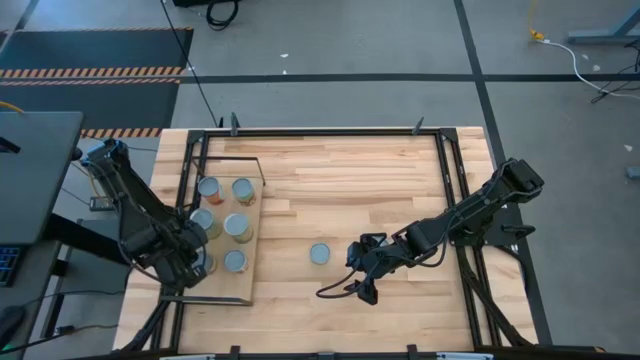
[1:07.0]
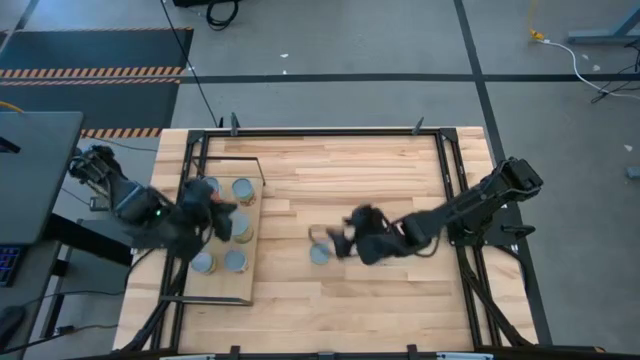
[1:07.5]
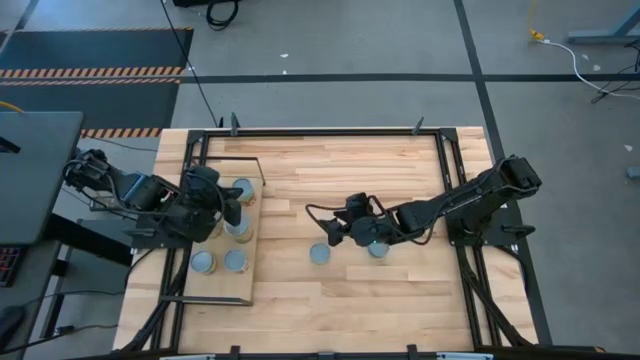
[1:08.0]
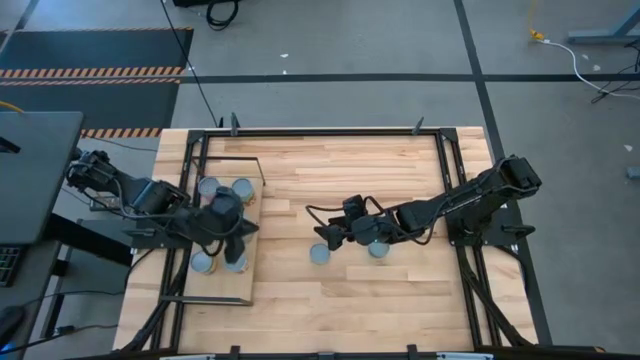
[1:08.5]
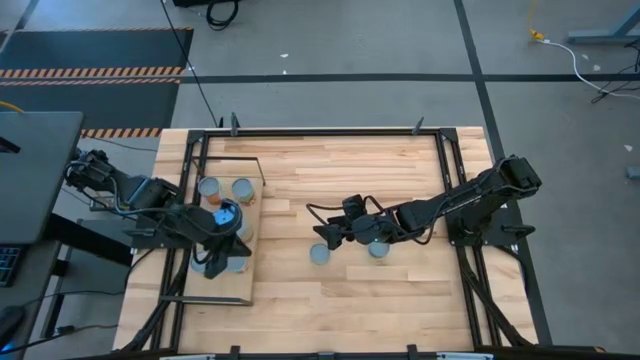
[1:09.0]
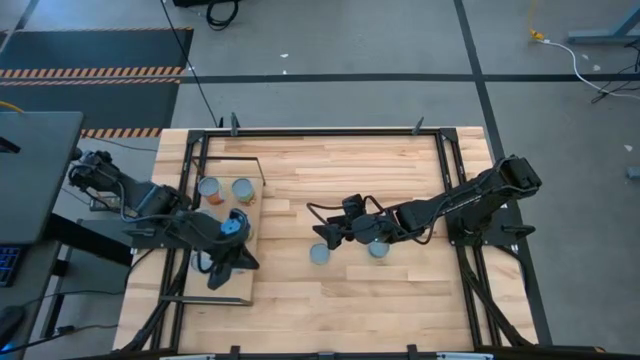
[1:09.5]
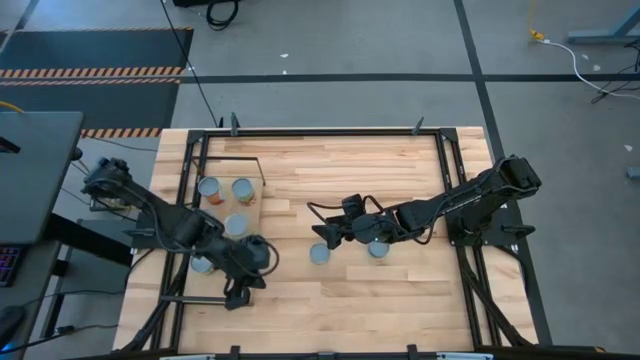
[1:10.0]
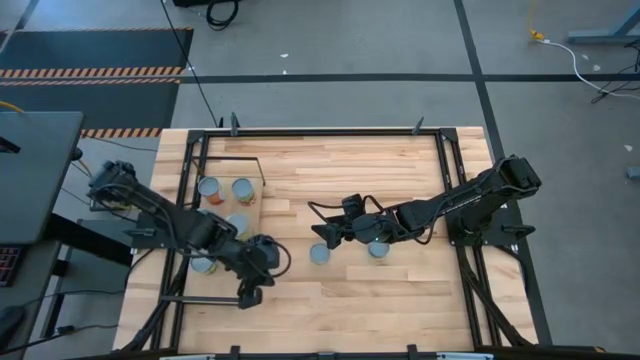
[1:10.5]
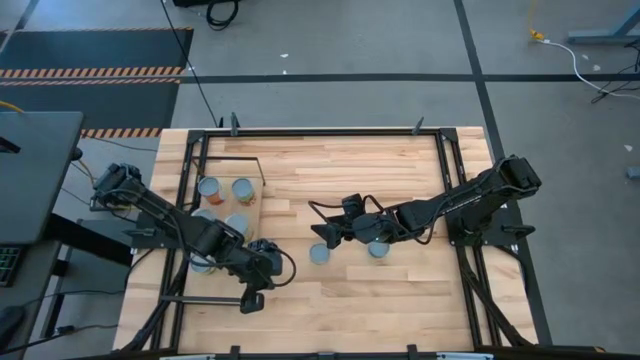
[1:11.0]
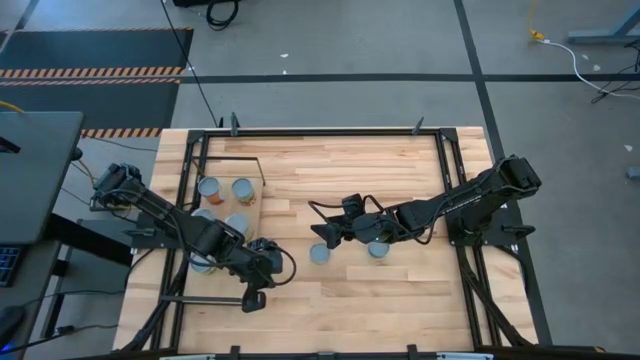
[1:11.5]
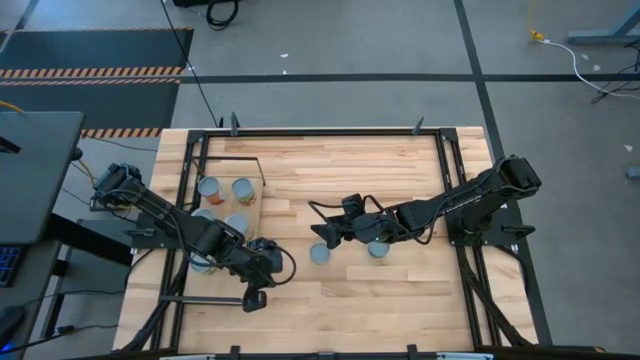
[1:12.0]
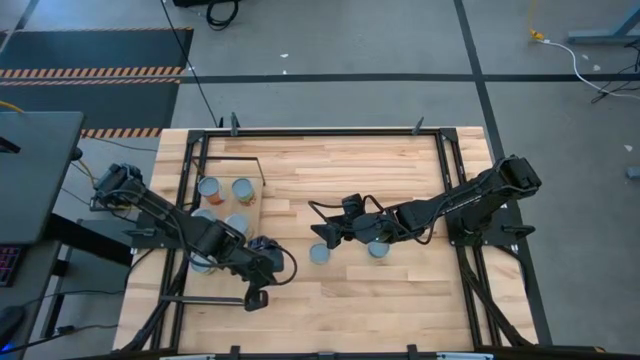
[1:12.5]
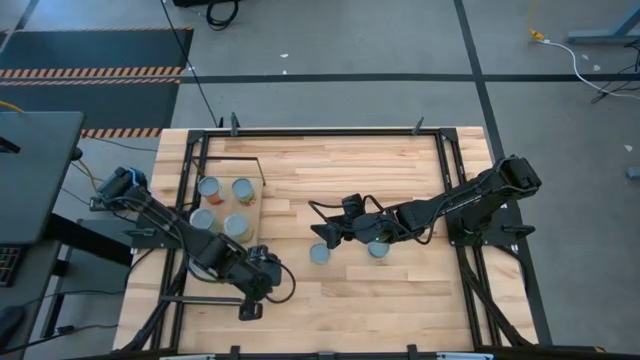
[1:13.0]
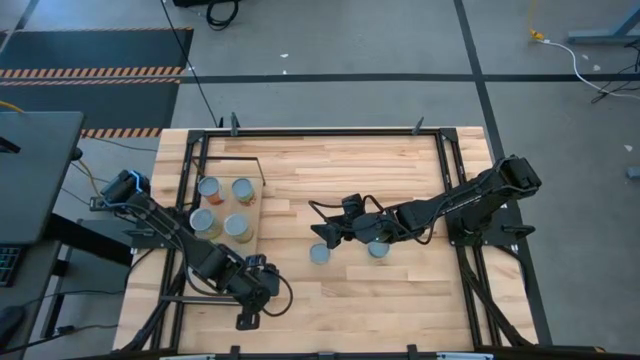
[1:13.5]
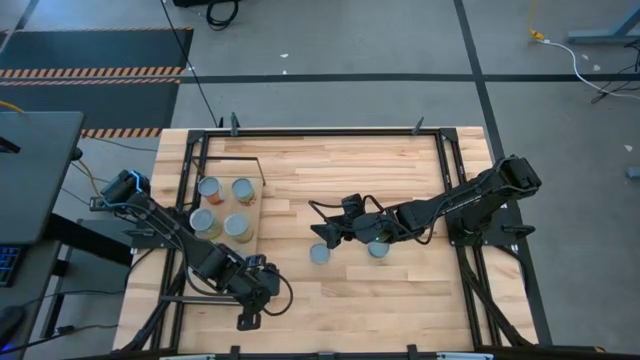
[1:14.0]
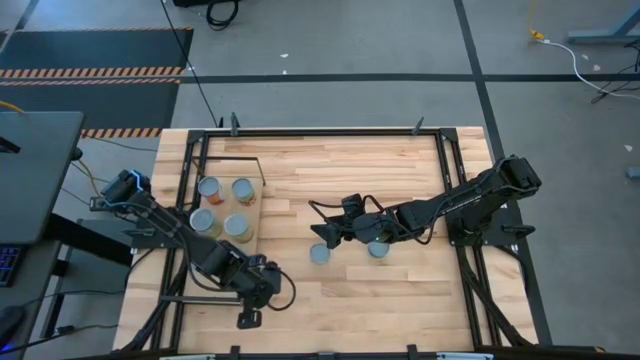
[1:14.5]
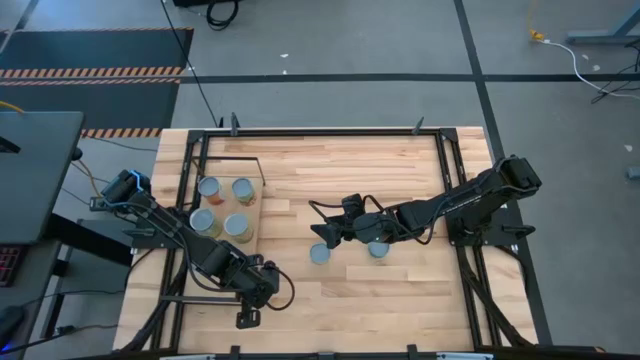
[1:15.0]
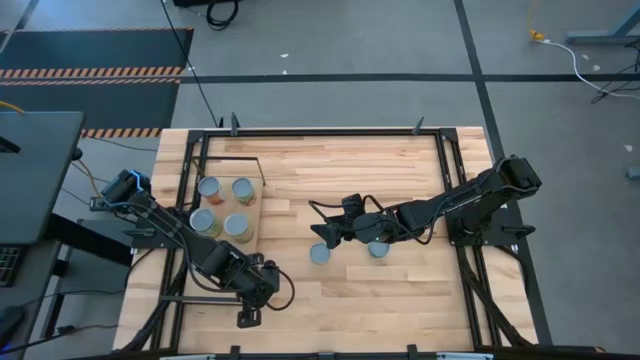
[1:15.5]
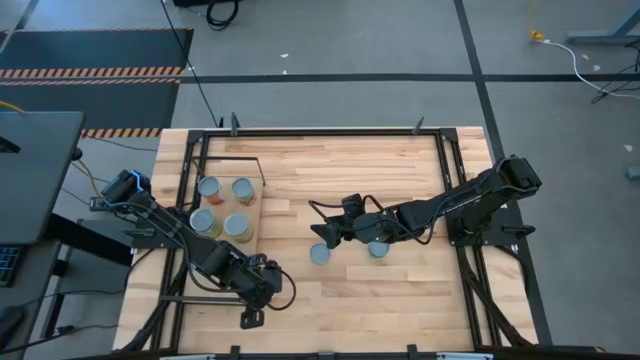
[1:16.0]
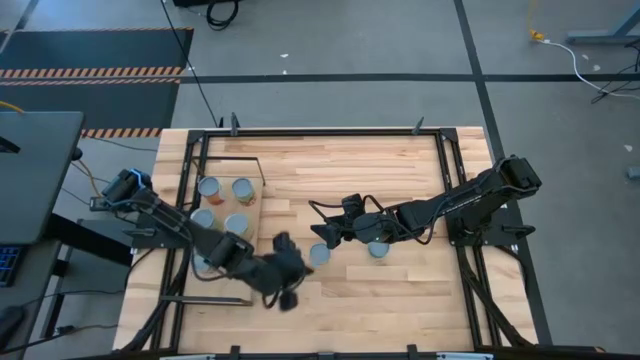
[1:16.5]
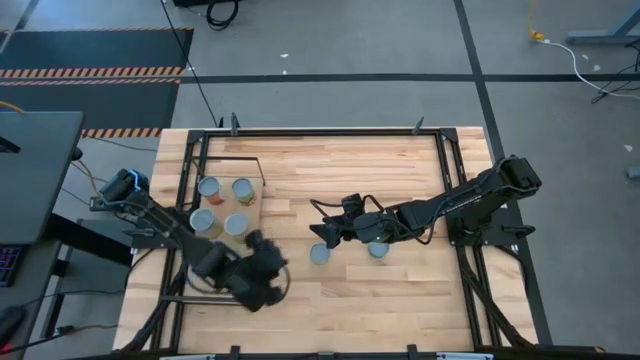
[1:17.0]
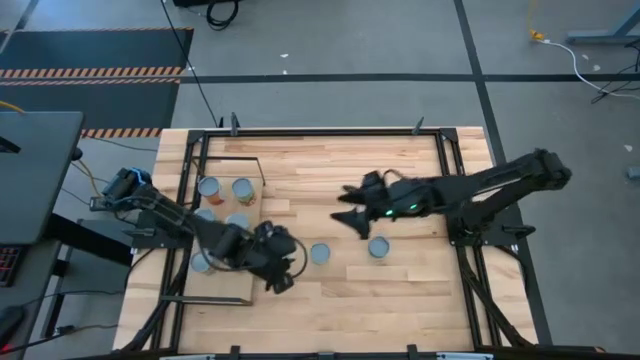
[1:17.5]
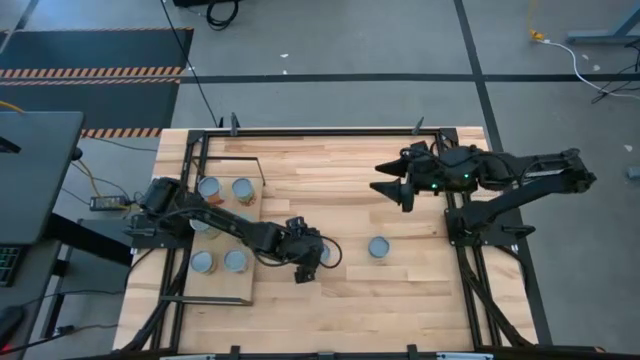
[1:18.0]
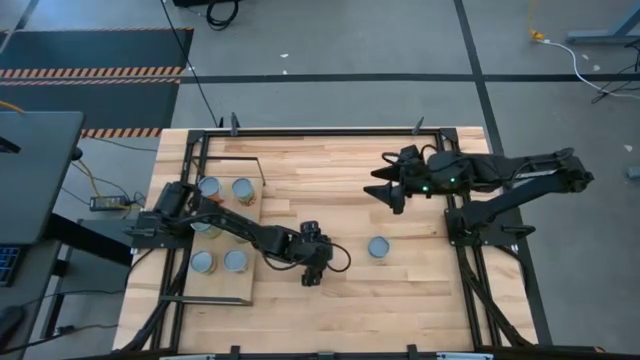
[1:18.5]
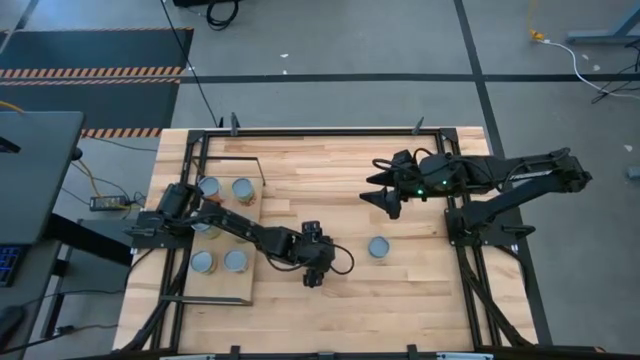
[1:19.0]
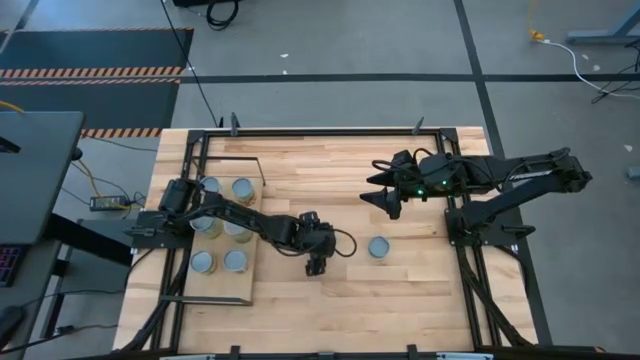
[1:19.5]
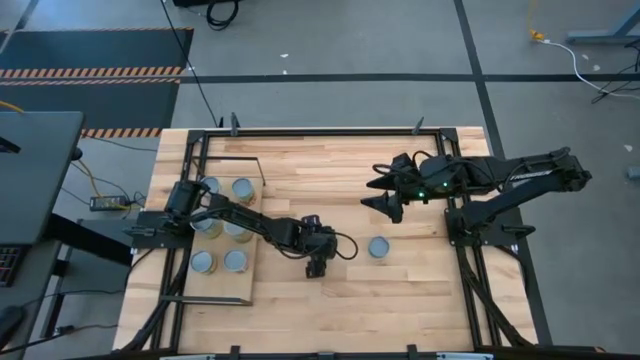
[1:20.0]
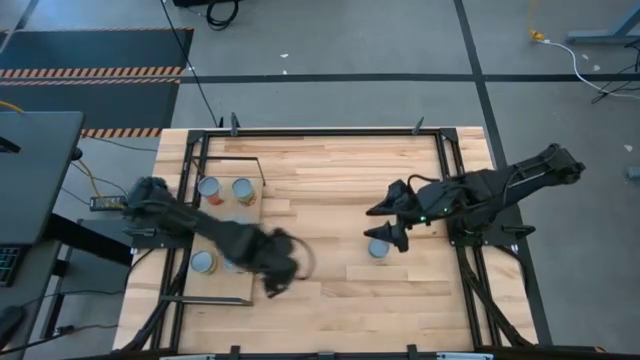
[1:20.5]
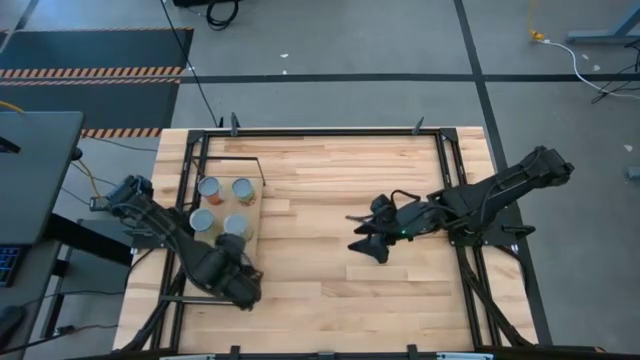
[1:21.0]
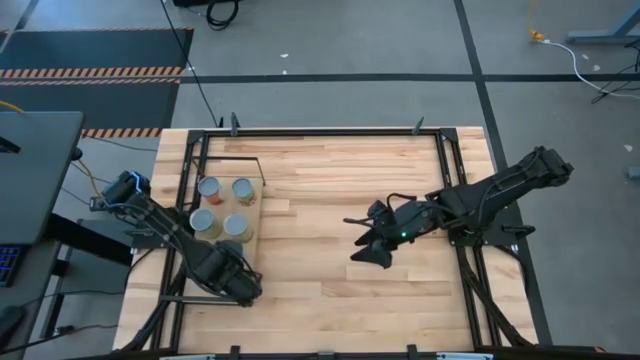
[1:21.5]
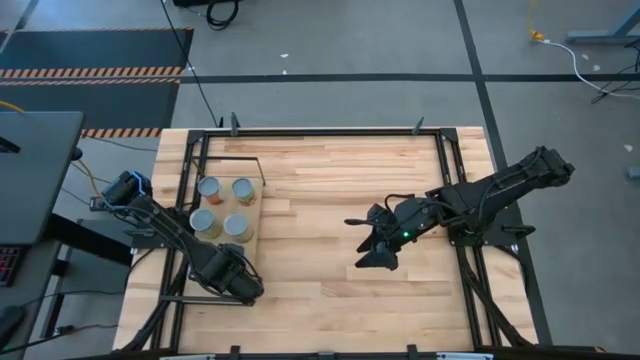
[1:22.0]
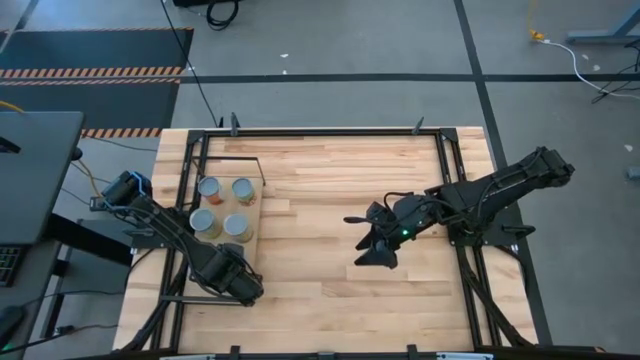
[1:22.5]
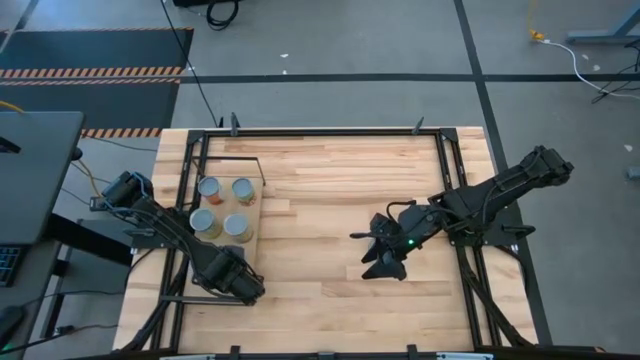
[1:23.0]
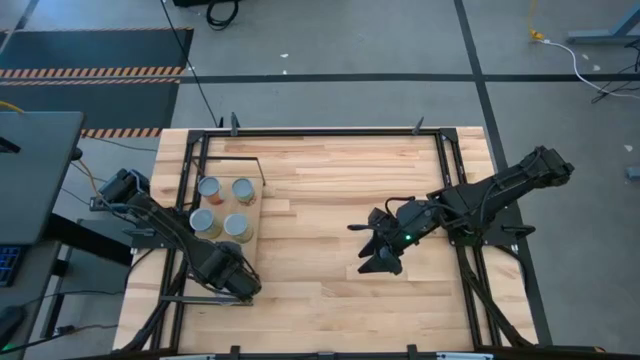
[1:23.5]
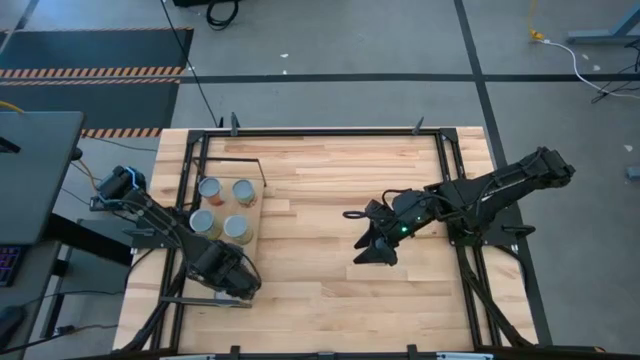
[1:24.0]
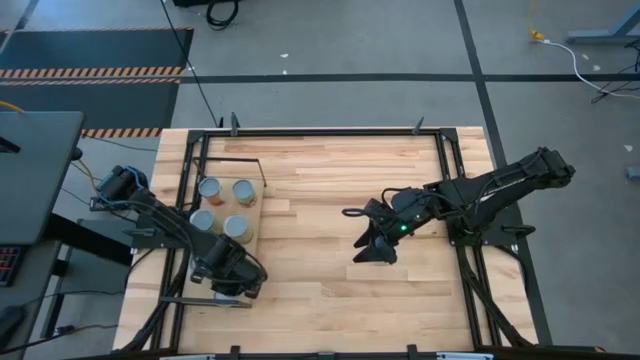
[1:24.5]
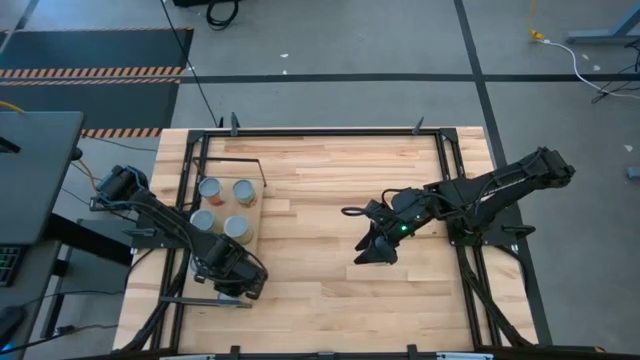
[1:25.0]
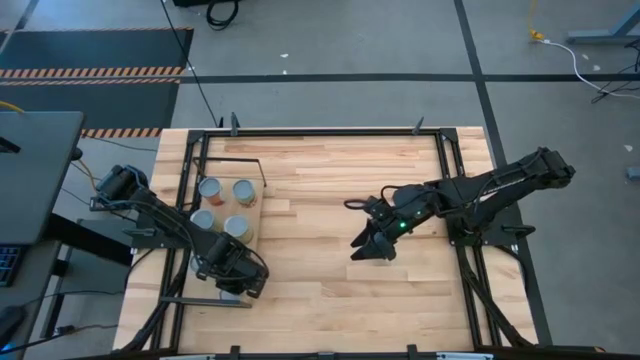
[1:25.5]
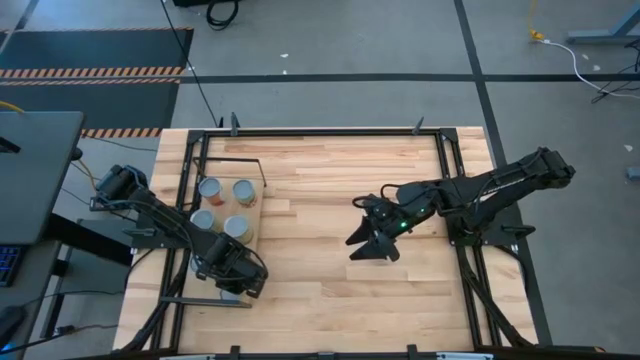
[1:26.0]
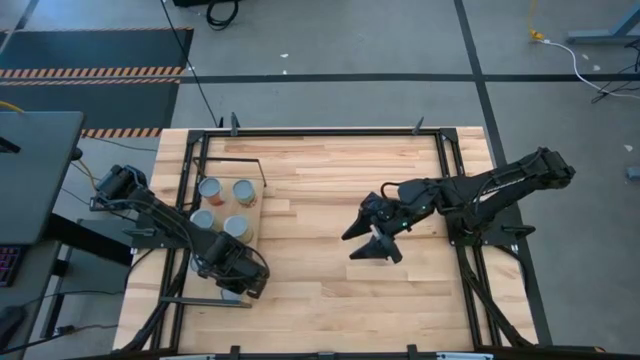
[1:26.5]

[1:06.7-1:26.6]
Task: Pick and place cans onto a shelf
Put the canned mushroom on the shelf

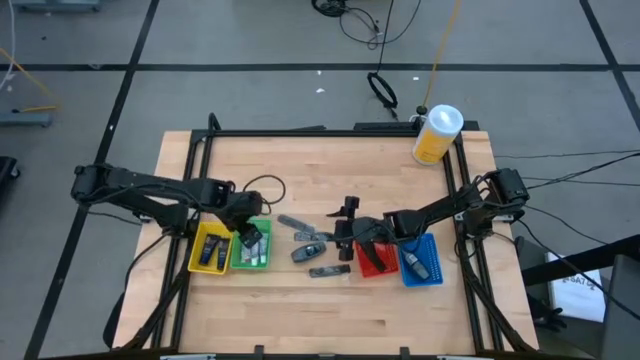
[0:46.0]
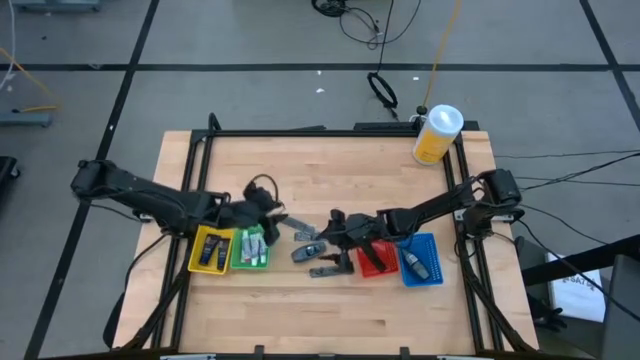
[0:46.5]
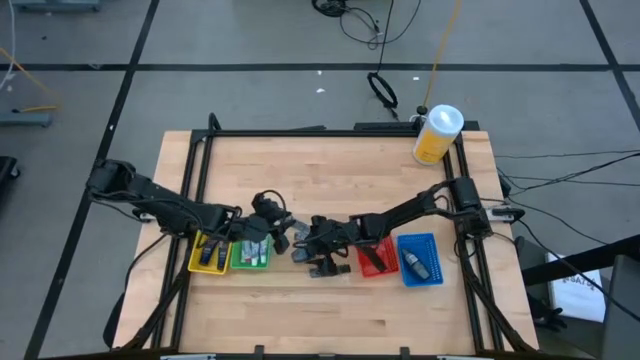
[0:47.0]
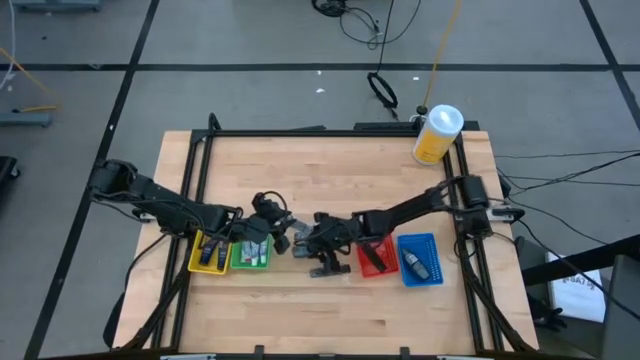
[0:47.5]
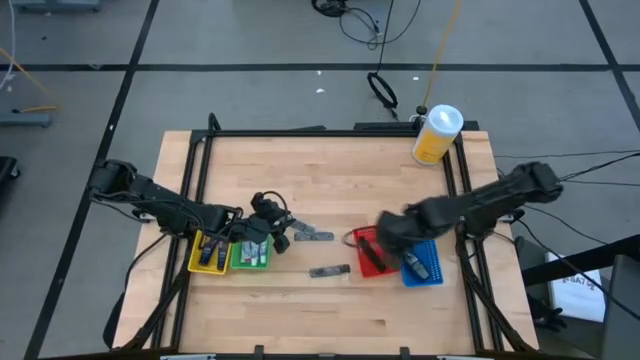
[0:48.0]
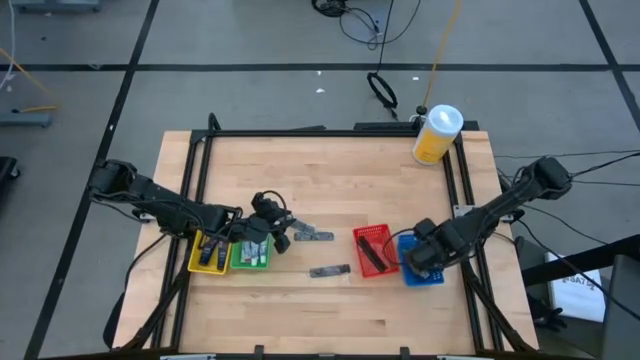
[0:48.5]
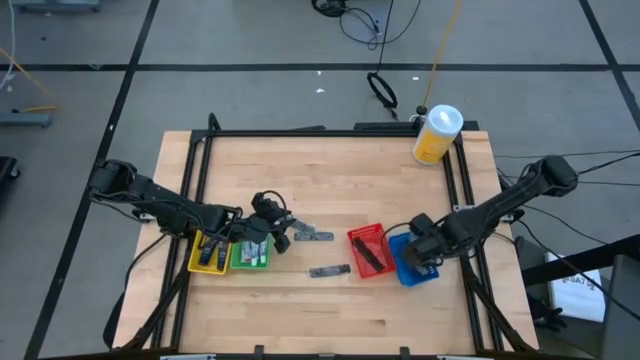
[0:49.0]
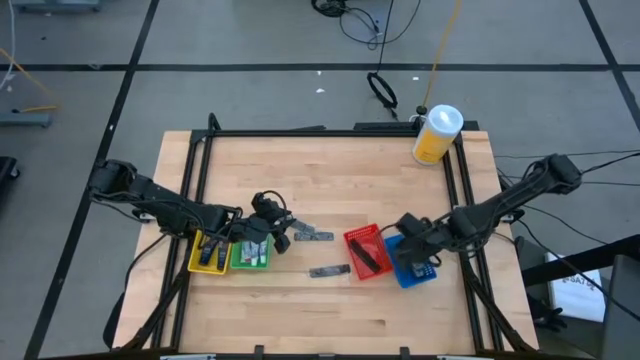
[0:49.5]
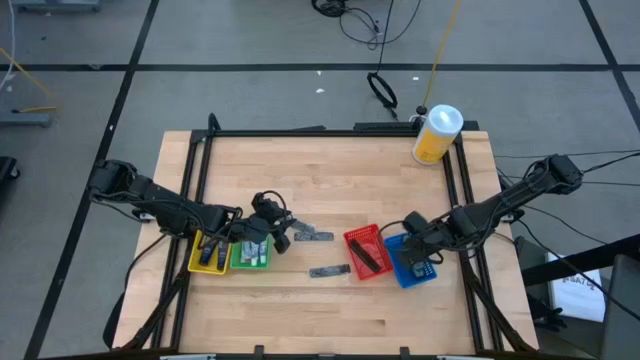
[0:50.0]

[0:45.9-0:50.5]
Task: Pick & Place Travel size toiletries
Put the black deodorant into the blue bin
